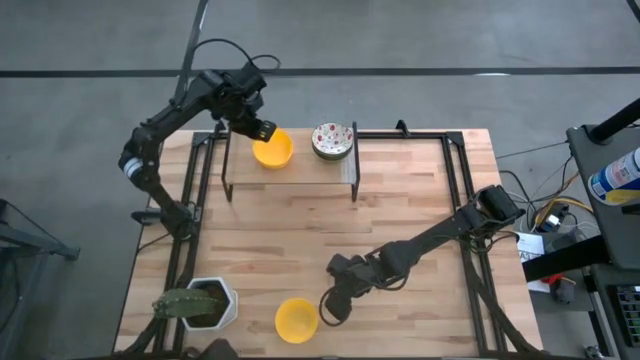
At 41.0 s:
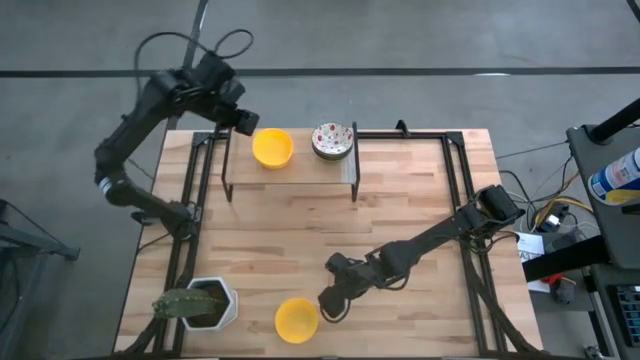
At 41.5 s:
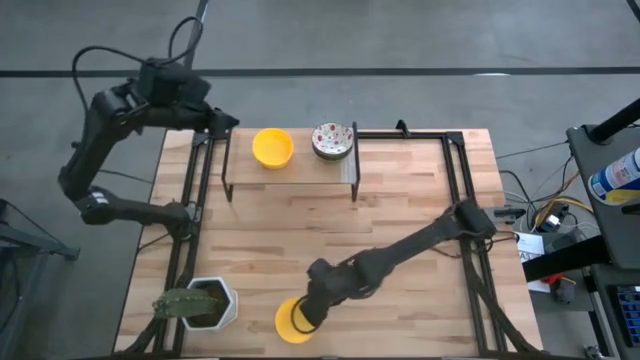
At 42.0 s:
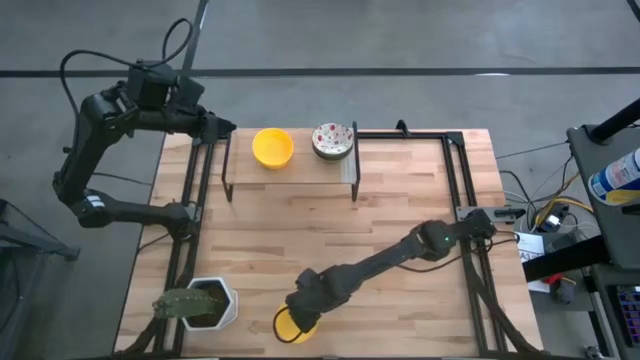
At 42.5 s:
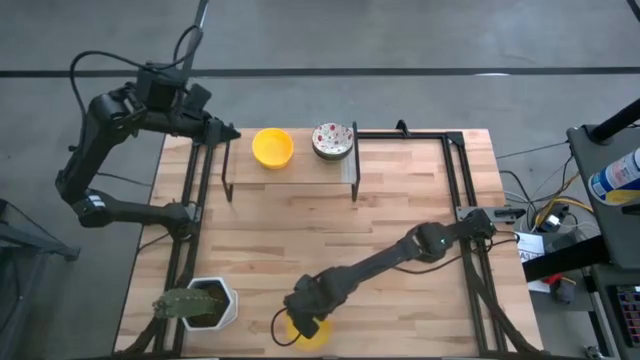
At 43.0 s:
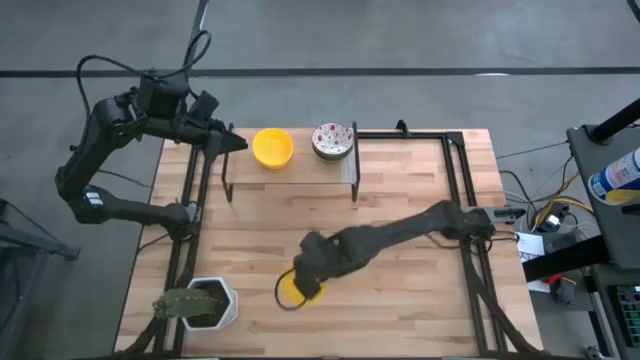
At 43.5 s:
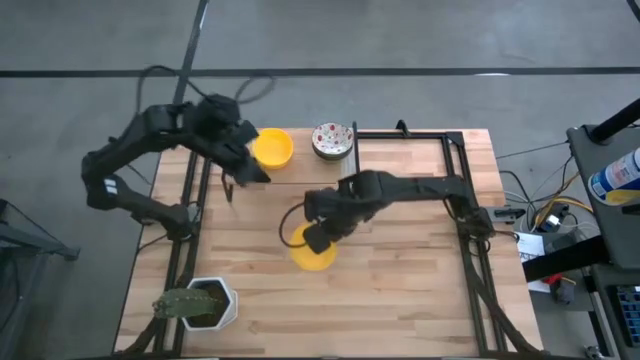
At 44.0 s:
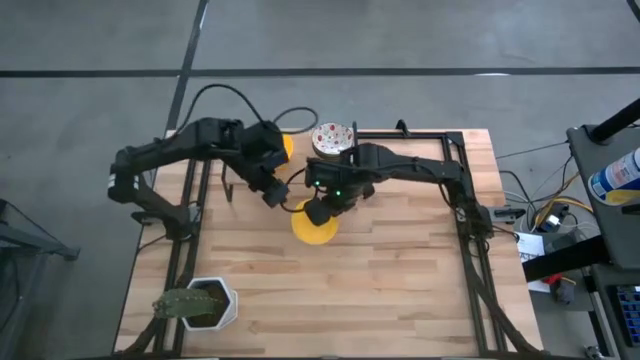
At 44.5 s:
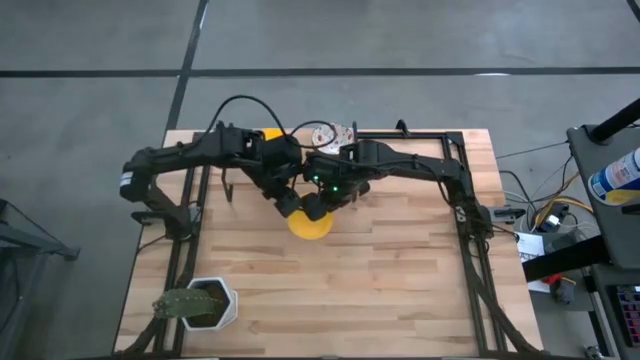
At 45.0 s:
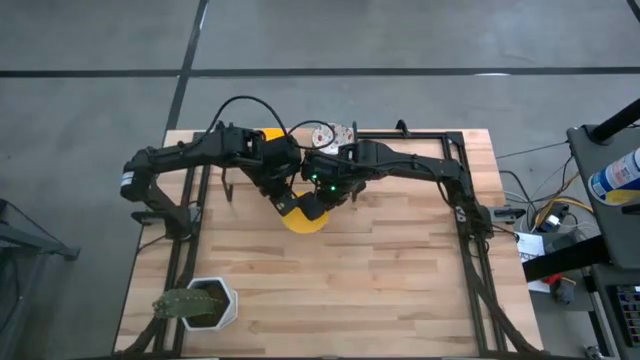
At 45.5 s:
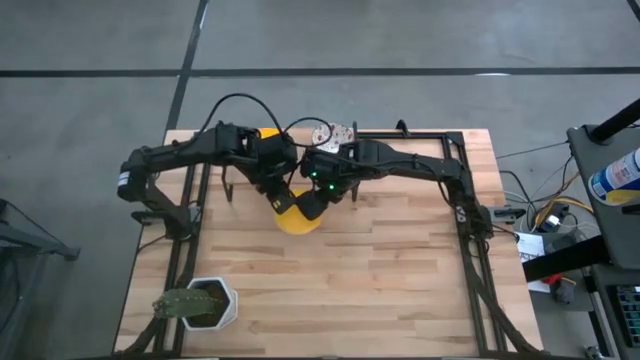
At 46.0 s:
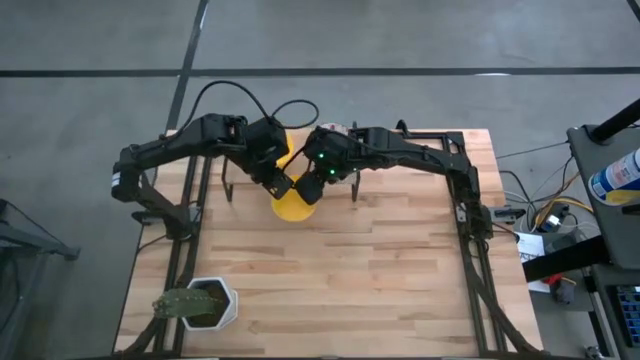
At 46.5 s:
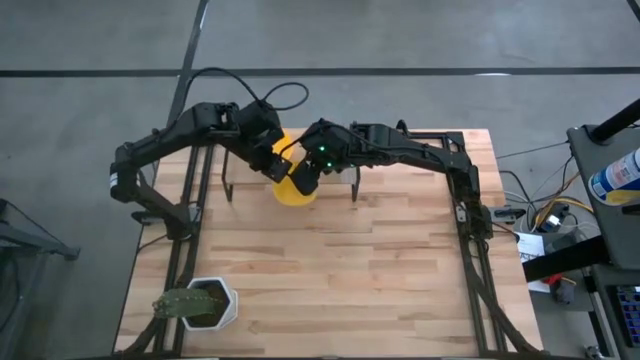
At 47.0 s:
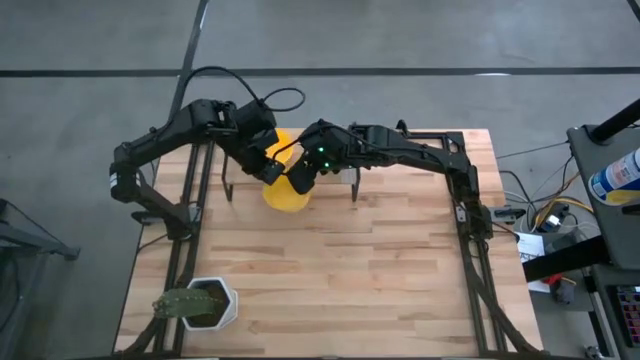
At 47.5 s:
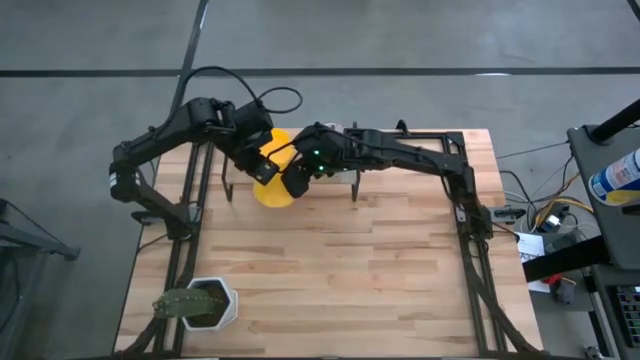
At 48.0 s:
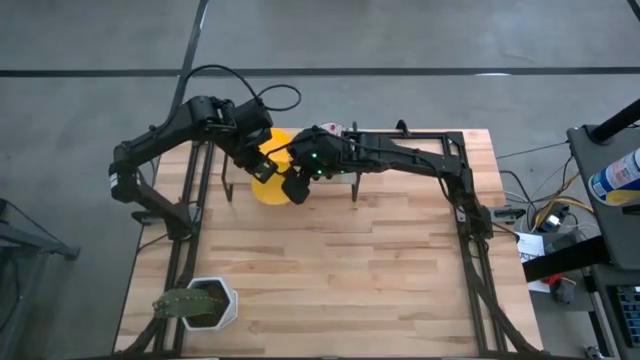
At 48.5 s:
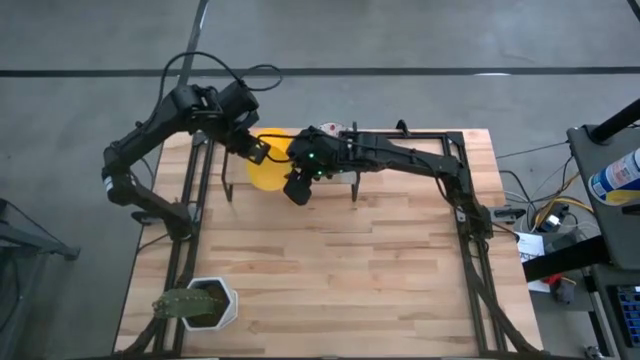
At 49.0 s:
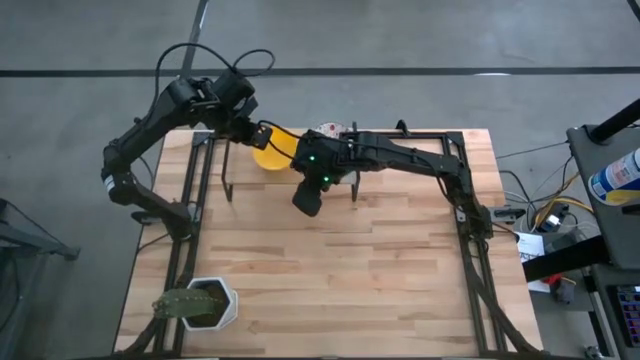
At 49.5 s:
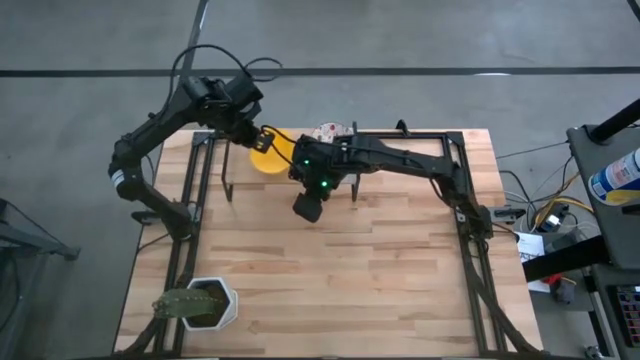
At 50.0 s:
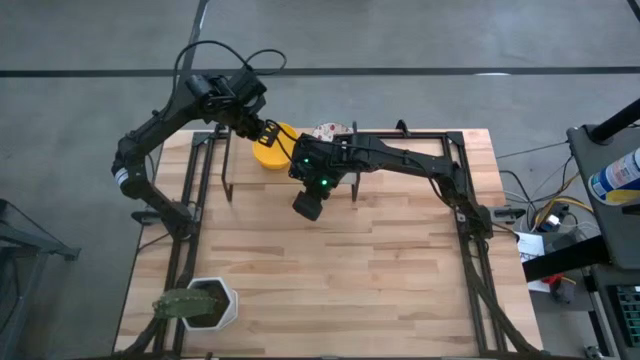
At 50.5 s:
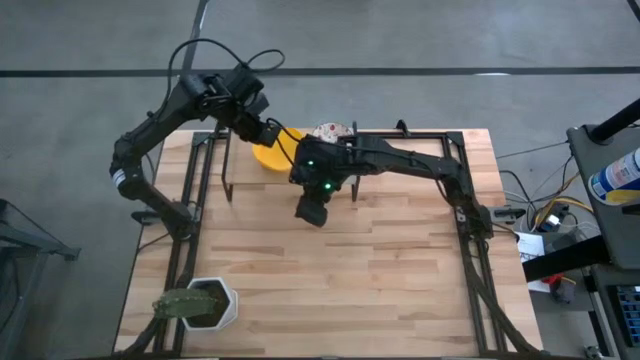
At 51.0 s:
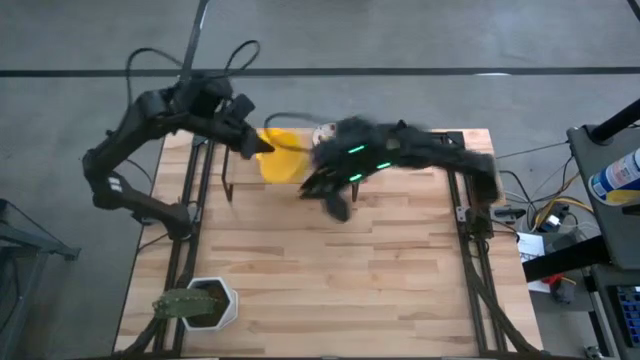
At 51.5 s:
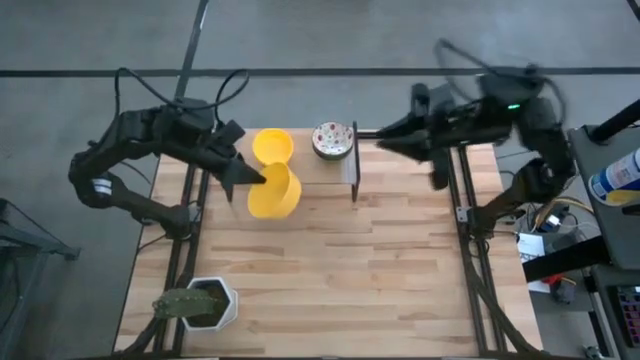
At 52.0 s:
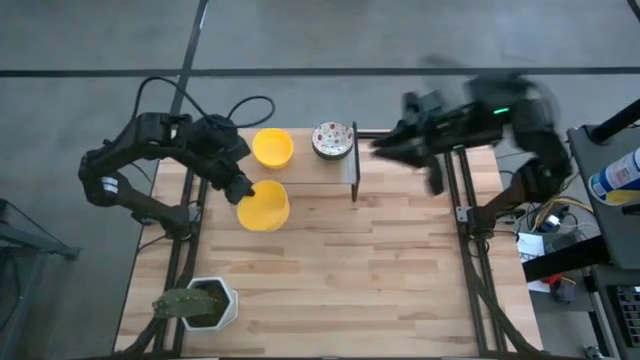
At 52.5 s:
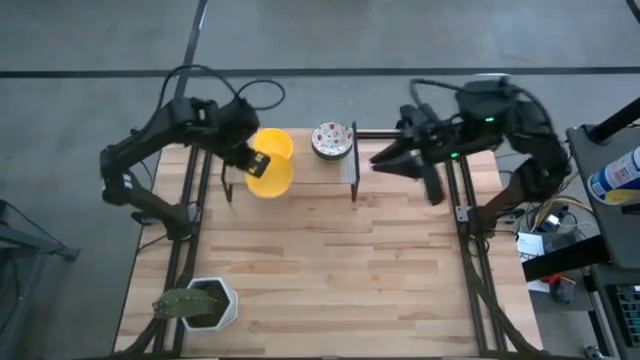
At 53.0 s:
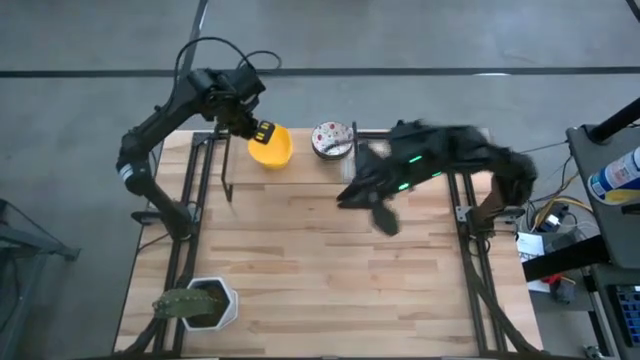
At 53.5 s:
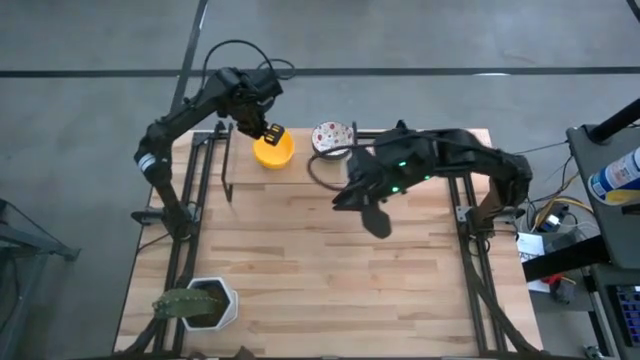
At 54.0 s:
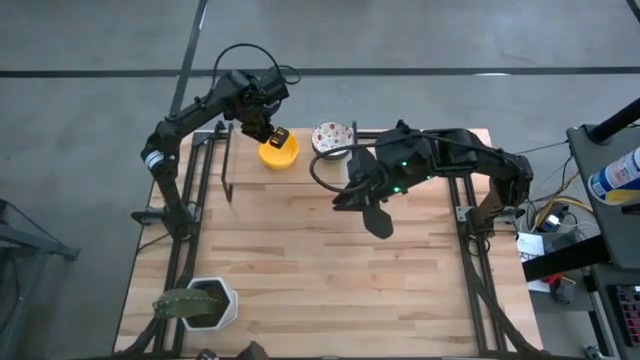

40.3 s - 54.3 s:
Task: Pick & Place Mini bowls
Stack the yellow bowl on top of the yellow bowl on the shelf

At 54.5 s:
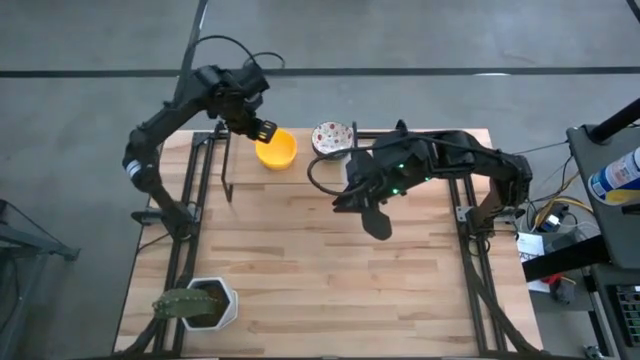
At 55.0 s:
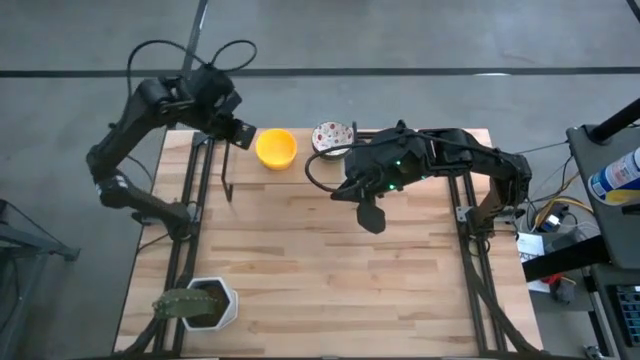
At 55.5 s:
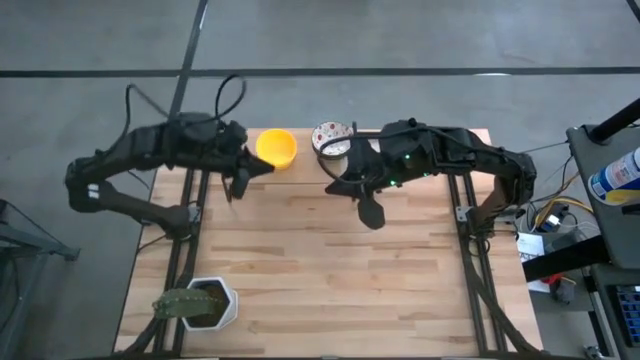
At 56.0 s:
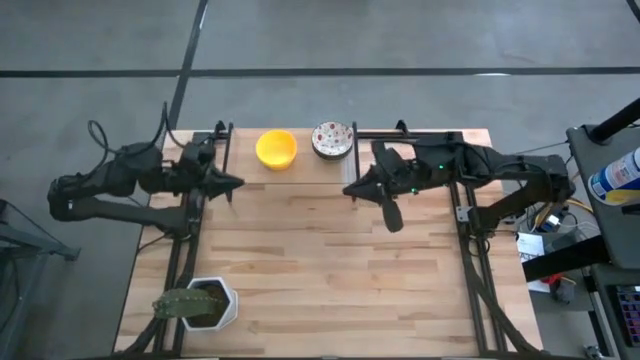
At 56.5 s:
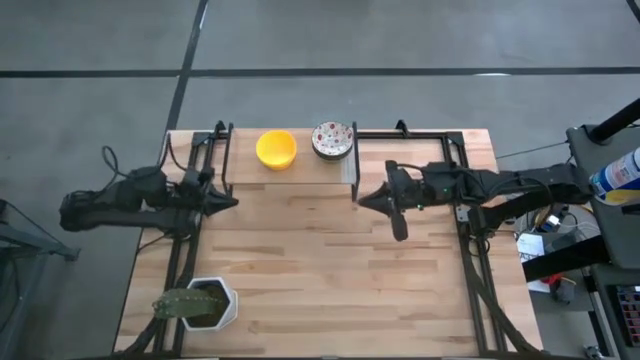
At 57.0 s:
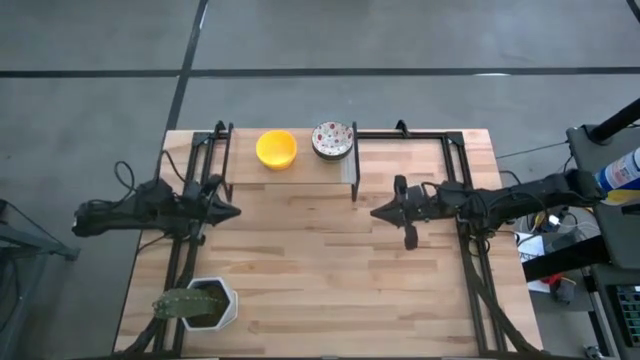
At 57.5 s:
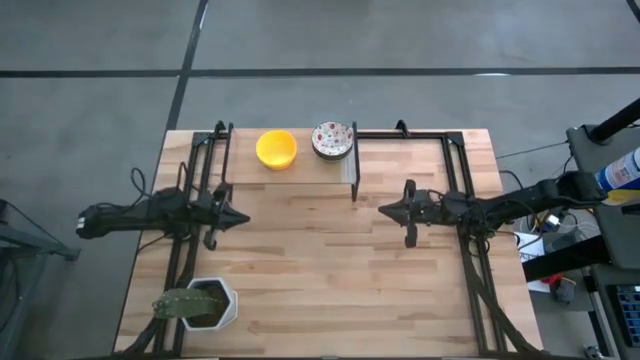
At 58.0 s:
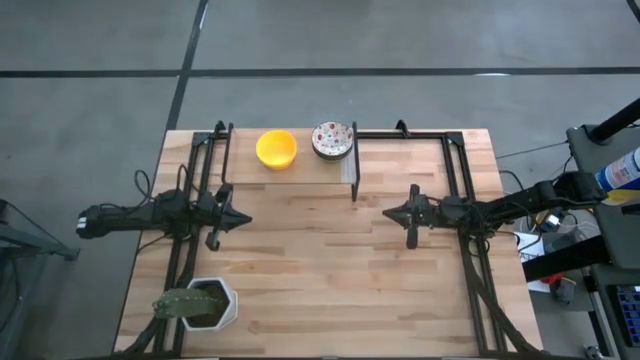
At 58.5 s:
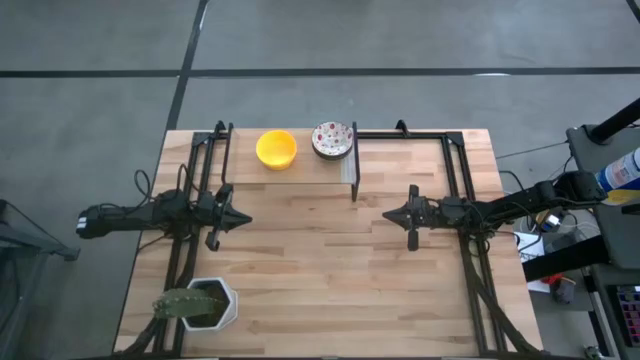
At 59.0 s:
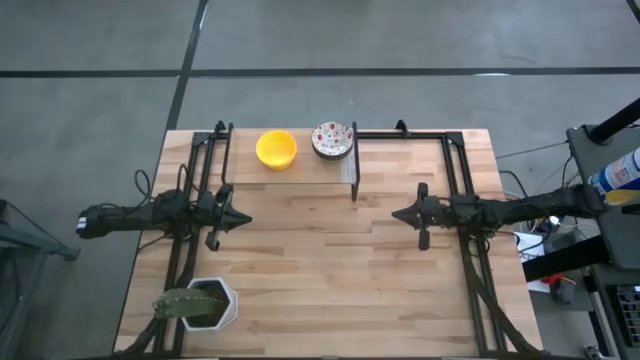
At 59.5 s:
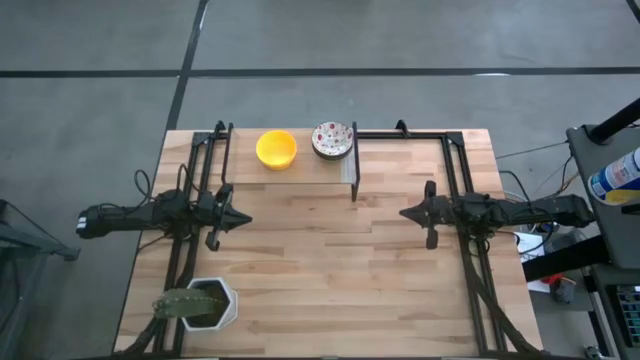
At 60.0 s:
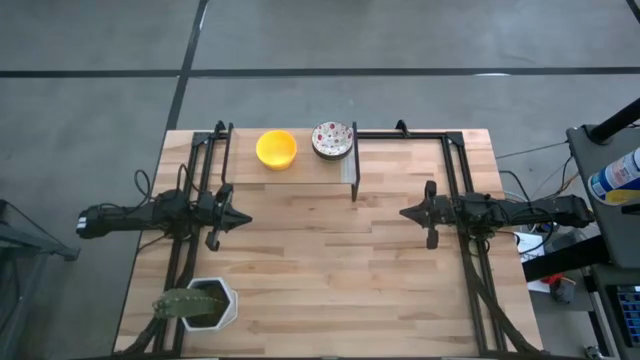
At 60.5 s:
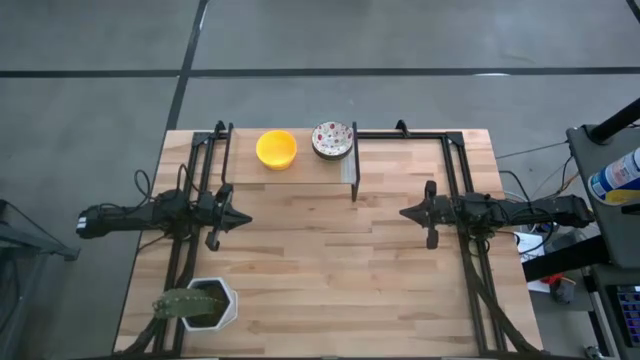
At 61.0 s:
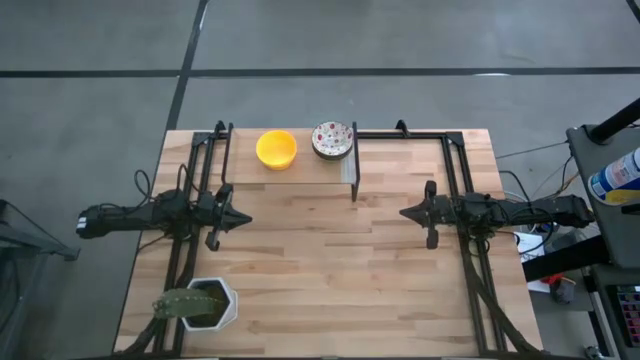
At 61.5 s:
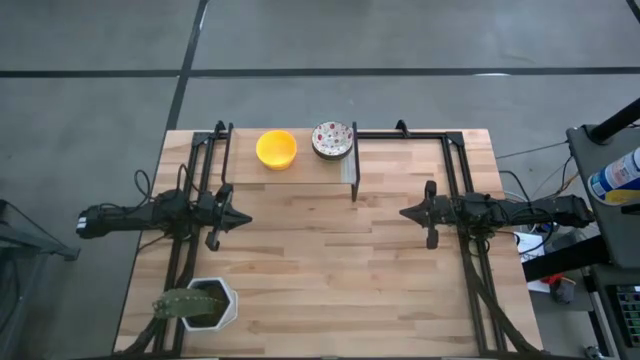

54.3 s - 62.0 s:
Return to Home Position
